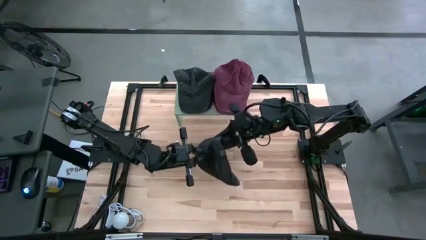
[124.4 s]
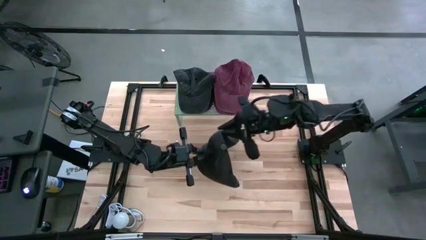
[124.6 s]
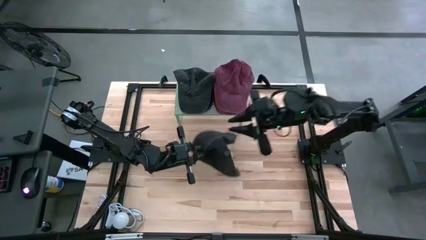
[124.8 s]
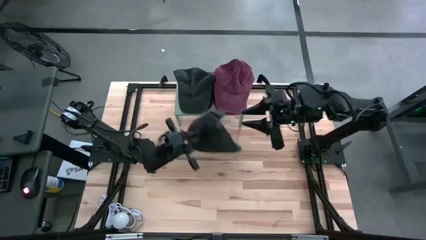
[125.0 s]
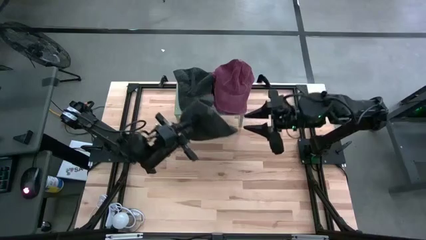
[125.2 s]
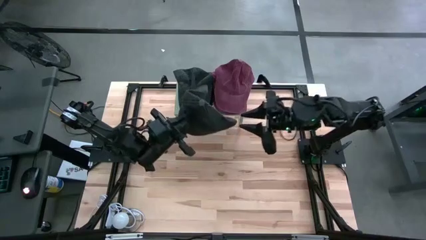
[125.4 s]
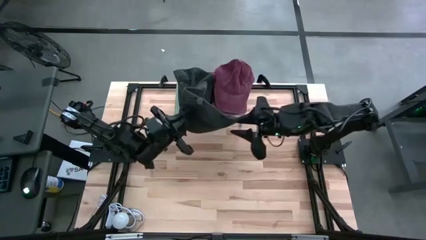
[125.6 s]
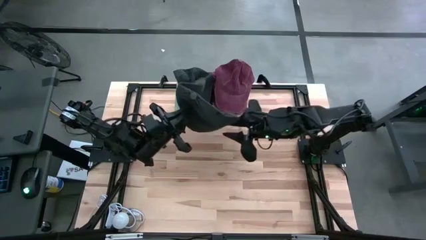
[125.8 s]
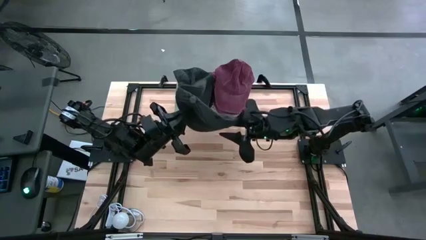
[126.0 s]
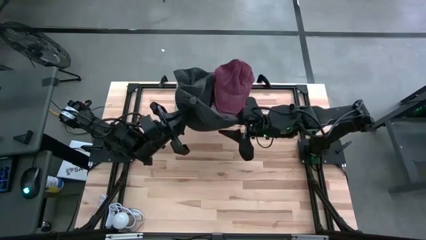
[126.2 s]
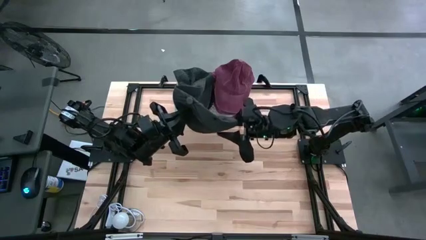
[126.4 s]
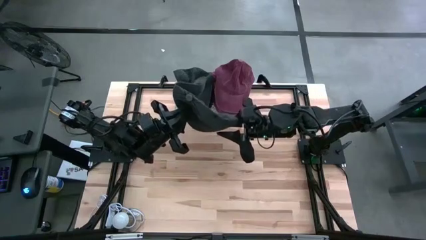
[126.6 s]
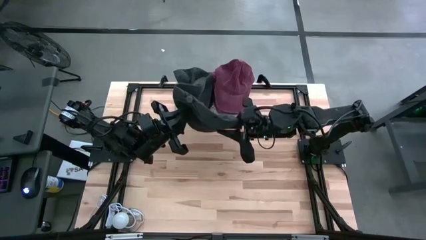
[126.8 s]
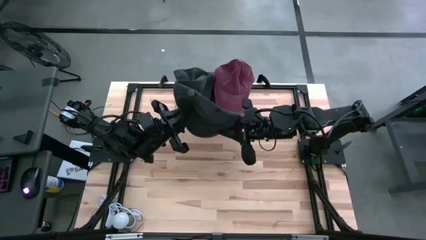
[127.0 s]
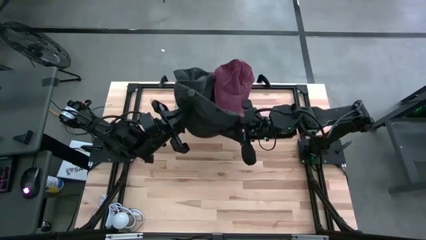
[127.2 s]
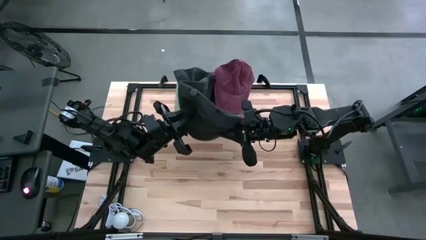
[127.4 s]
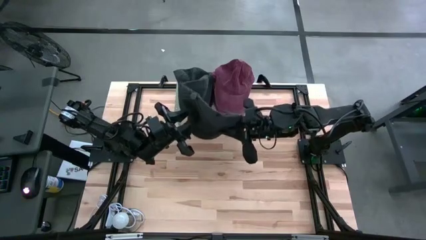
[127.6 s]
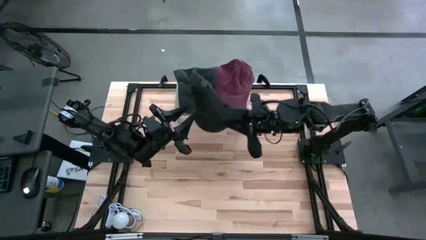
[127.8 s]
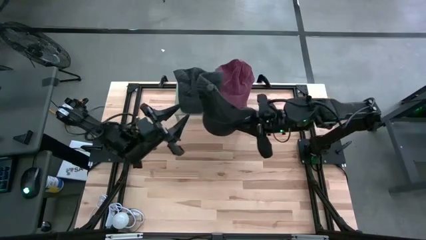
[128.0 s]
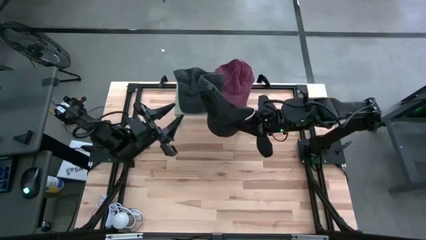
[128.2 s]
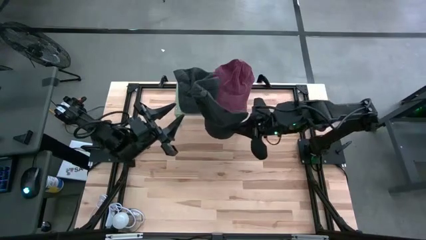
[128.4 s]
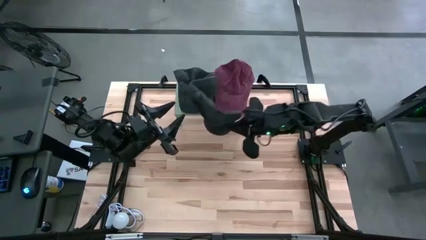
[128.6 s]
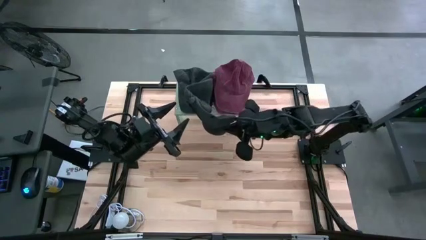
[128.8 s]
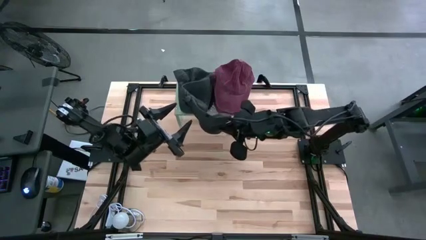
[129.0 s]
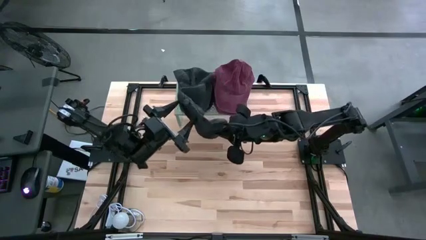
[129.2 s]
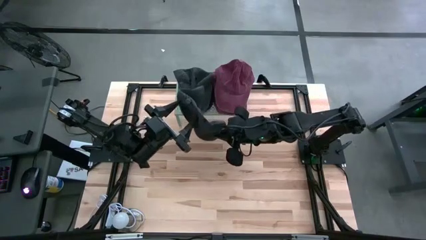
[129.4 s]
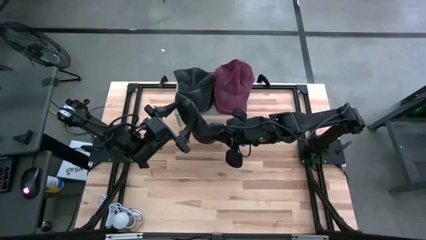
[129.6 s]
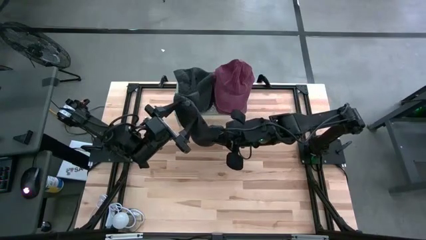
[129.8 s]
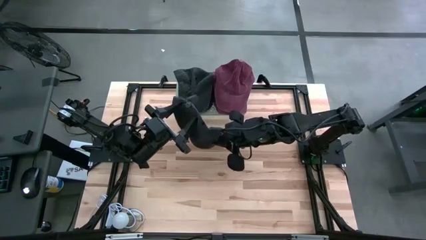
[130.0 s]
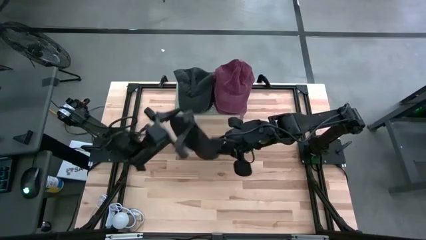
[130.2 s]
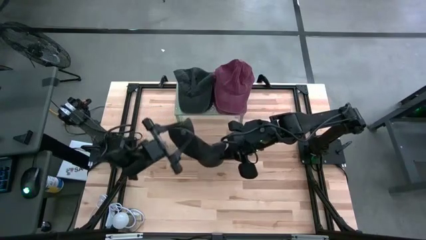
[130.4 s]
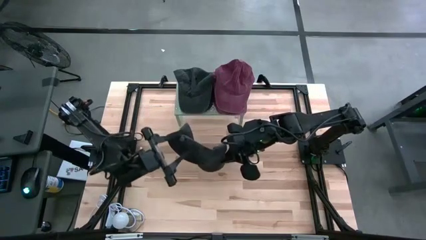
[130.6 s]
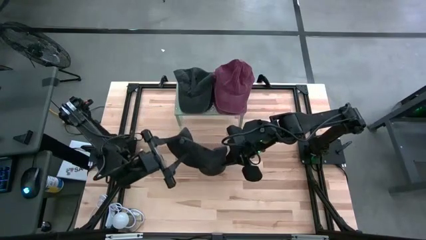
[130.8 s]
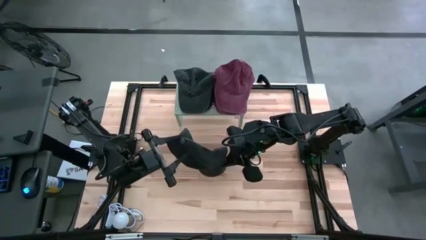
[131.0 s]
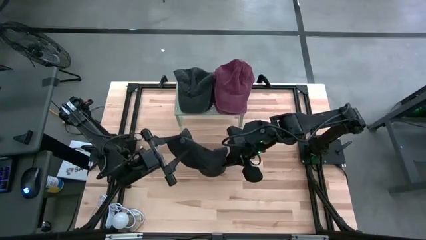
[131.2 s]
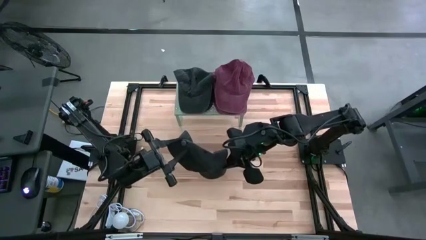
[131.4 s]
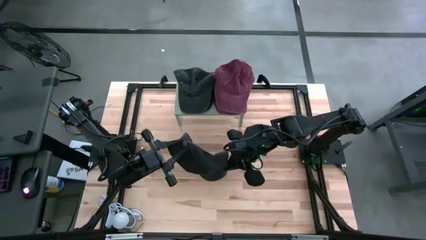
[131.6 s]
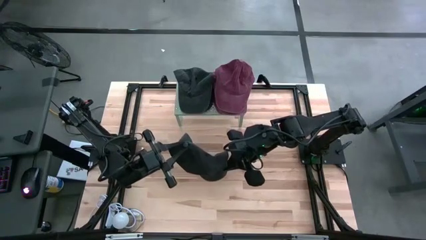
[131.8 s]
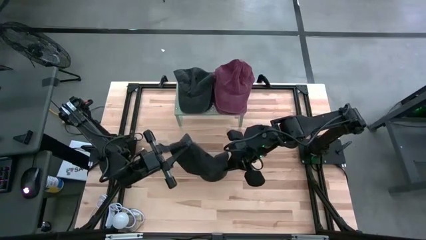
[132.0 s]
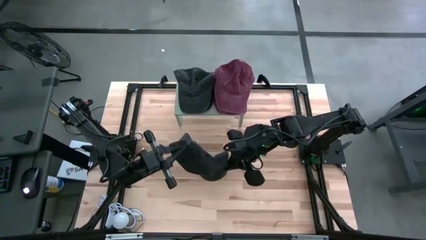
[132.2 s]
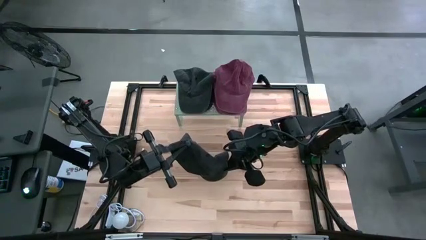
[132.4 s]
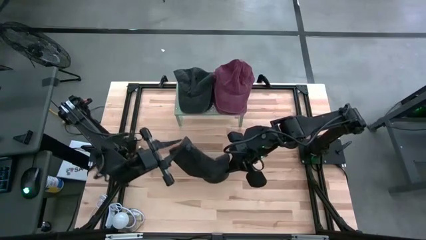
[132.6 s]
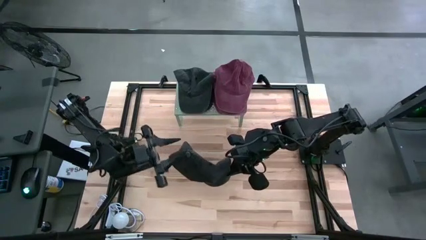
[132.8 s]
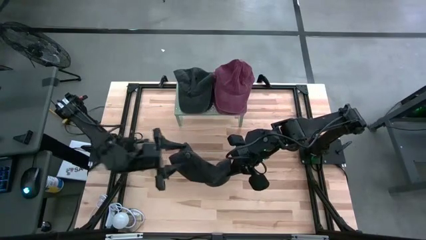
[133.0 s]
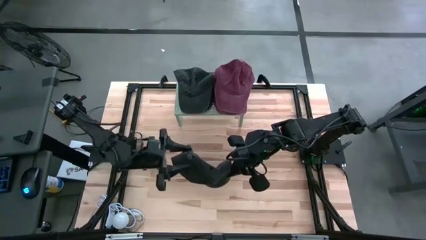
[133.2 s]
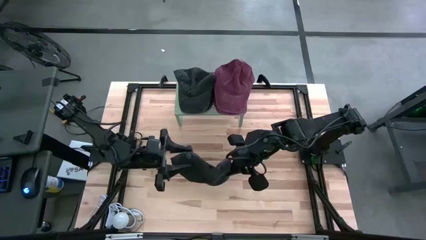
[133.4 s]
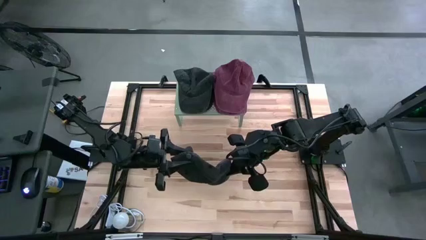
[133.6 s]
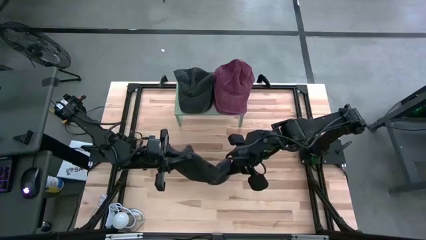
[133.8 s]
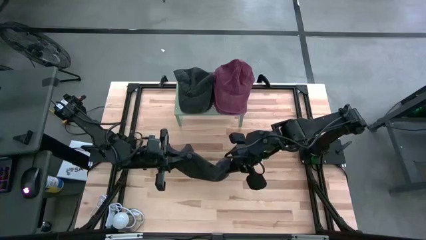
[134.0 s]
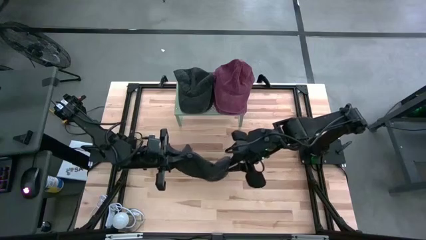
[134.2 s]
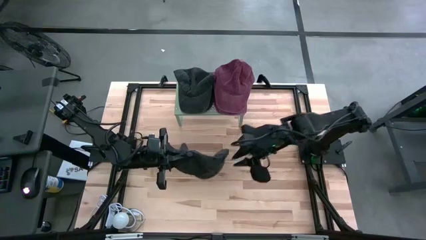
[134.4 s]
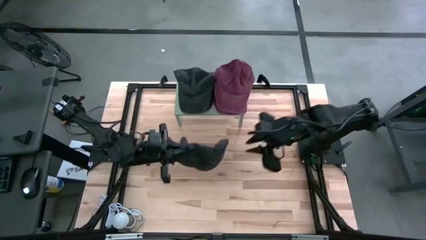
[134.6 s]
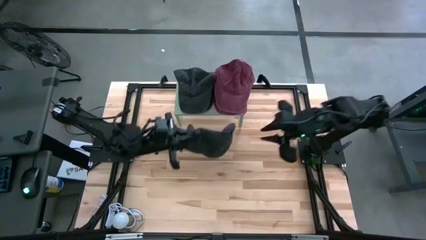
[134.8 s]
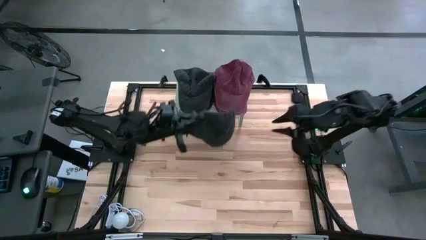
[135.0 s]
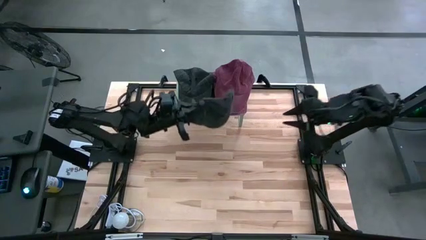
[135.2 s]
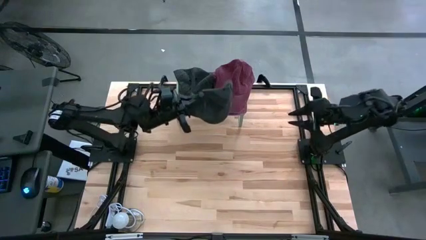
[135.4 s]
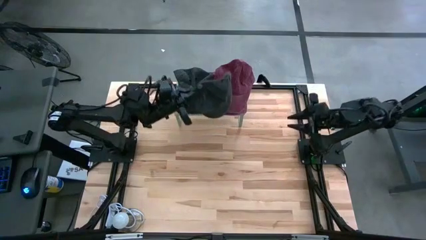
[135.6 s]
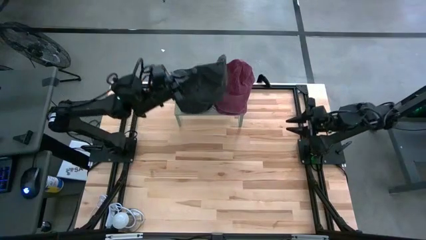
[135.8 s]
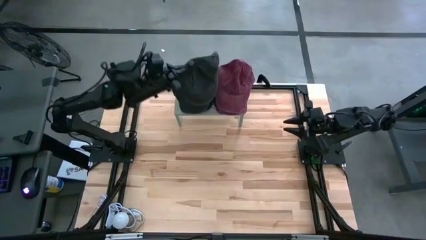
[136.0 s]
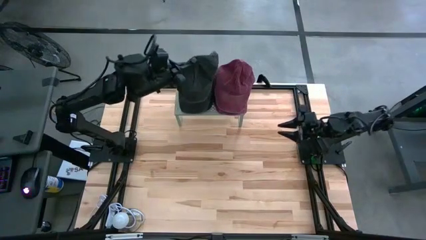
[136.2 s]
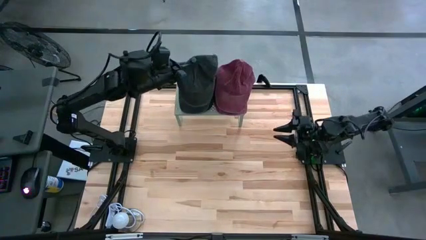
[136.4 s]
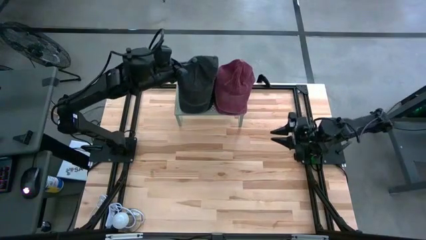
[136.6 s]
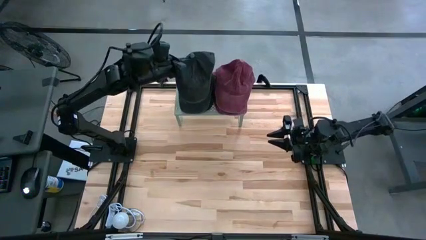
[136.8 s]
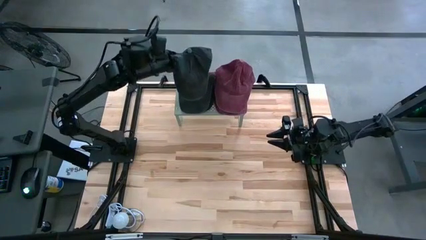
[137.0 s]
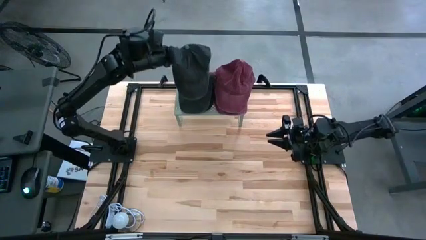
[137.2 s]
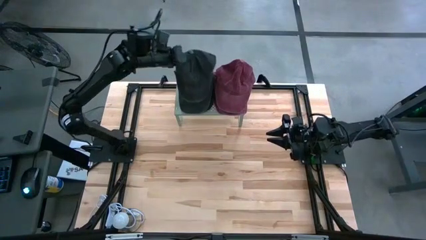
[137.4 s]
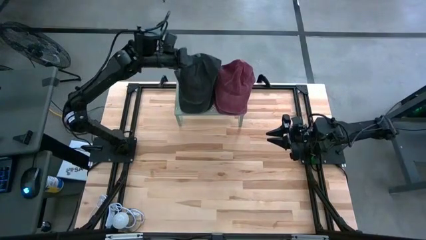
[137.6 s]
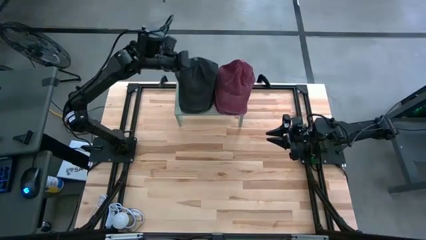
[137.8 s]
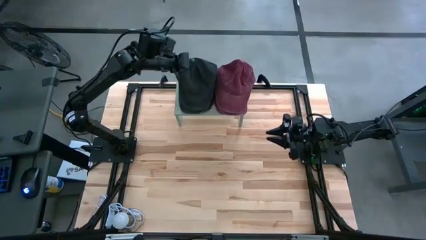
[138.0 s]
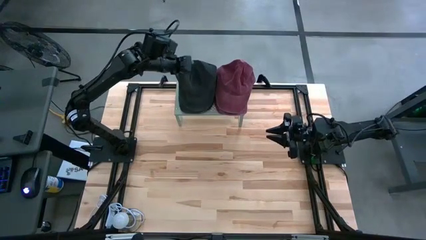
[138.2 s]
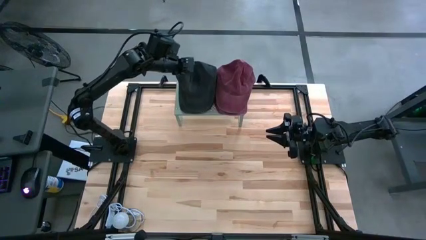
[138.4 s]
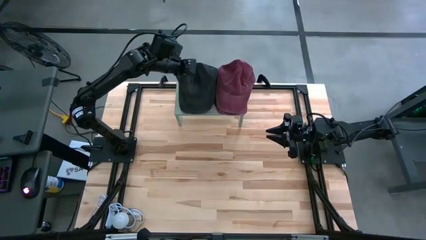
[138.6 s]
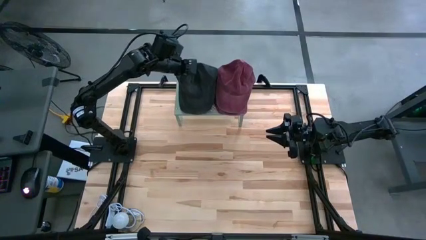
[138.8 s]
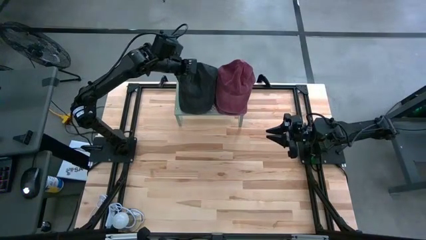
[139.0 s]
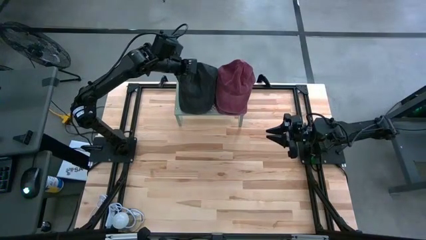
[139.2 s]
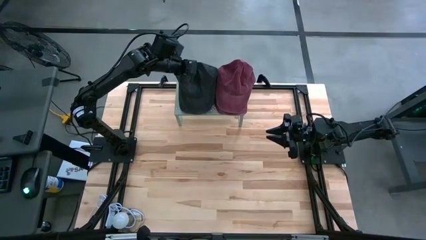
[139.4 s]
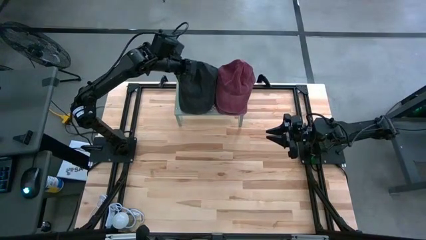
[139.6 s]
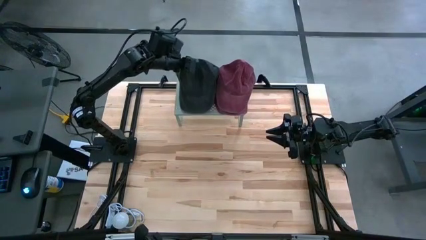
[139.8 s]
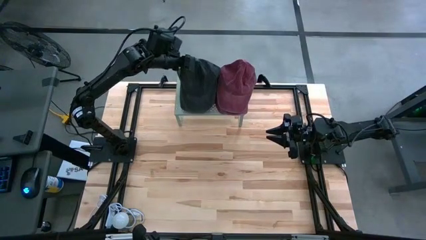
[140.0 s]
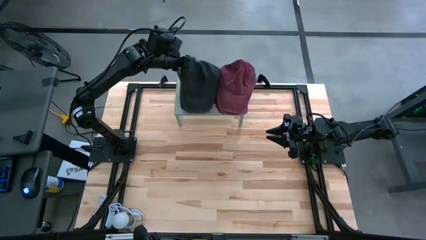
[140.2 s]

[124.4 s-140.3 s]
Task: Pick & Place hat
Stack the black cap on the red caps on the shelf

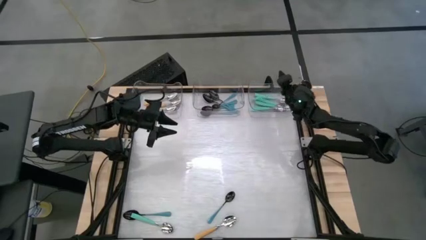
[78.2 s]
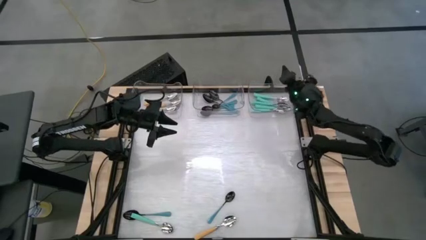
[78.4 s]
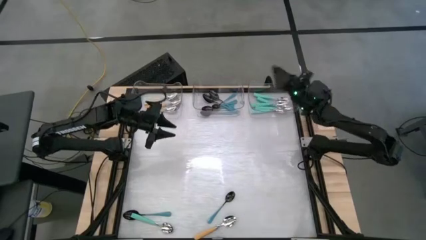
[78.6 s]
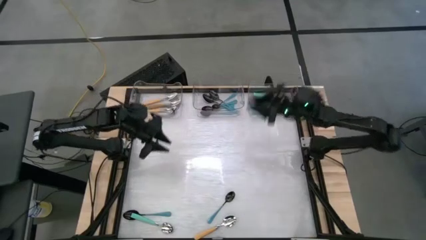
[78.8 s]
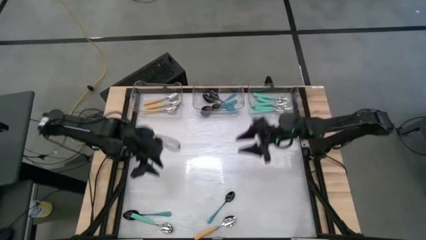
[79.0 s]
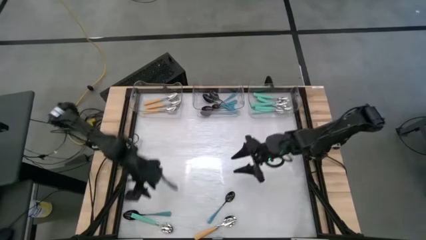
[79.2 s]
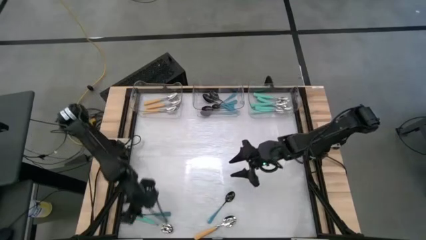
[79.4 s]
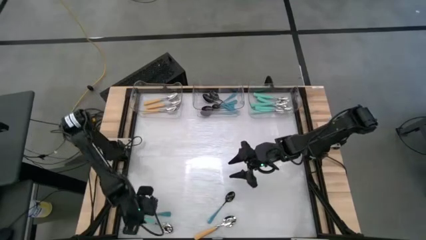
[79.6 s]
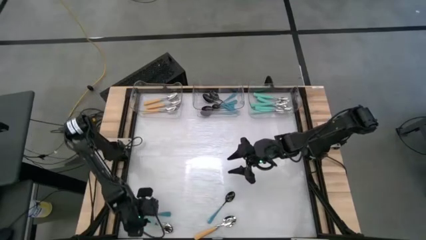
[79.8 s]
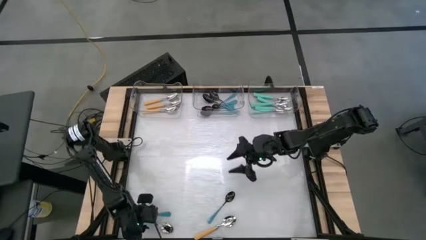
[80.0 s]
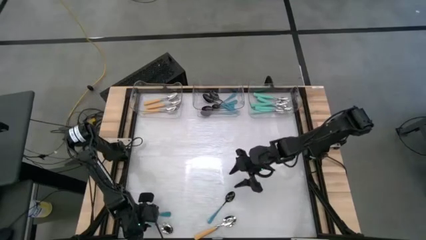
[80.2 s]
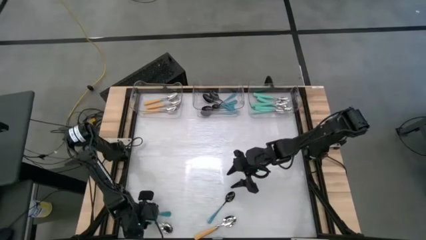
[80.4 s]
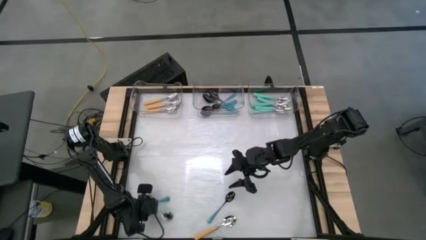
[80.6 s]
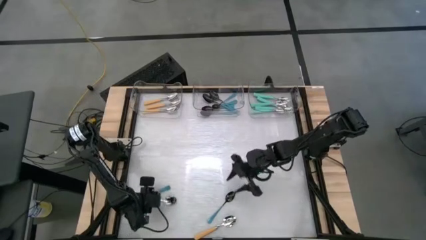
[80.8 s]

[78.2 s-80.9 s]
Task: Sort silverware by color (type)
Adjust the spoons
